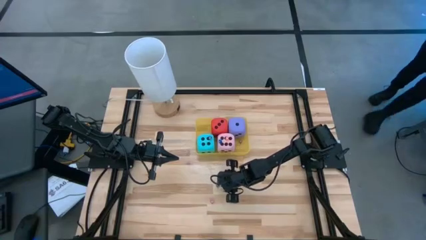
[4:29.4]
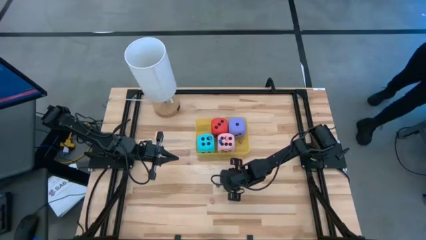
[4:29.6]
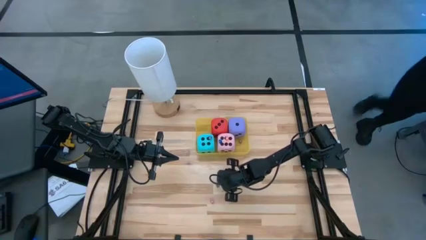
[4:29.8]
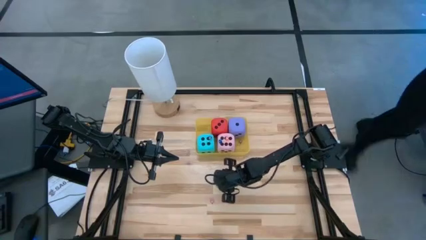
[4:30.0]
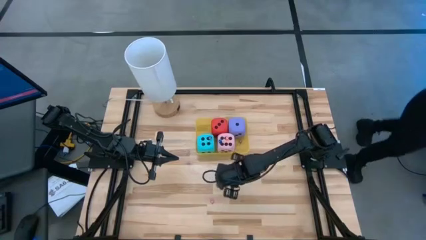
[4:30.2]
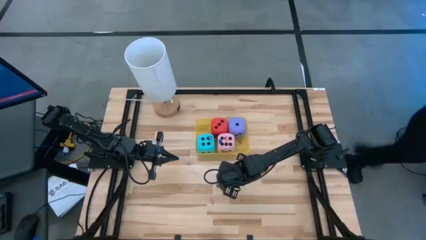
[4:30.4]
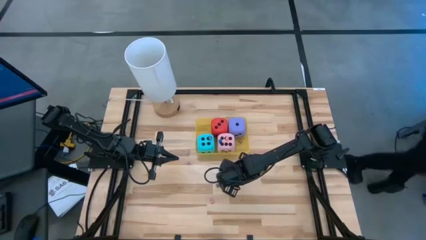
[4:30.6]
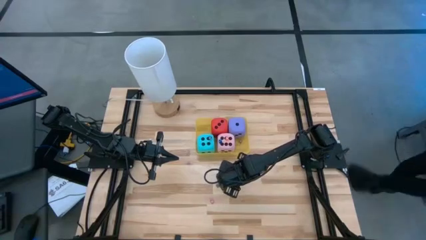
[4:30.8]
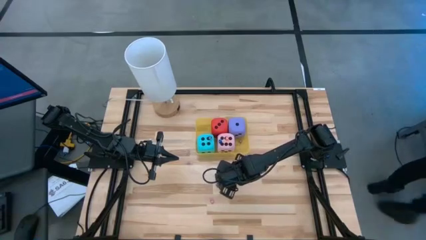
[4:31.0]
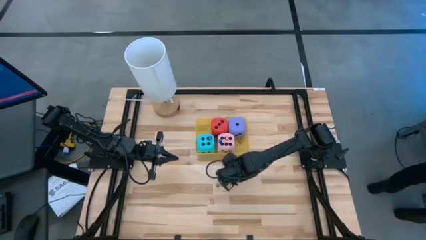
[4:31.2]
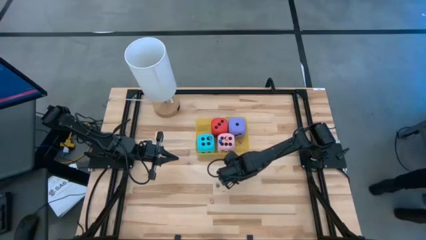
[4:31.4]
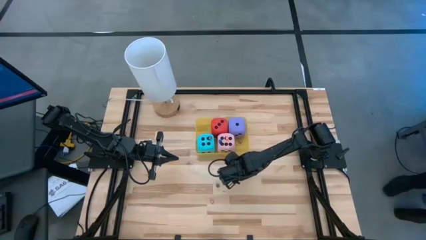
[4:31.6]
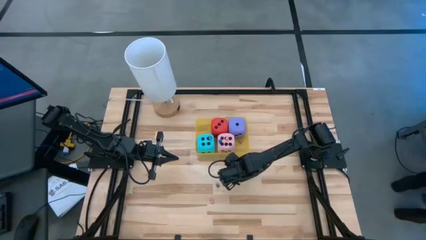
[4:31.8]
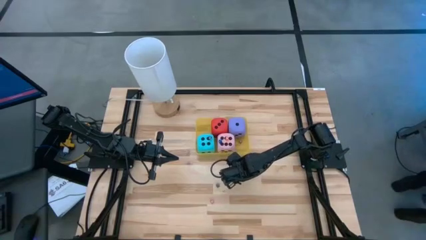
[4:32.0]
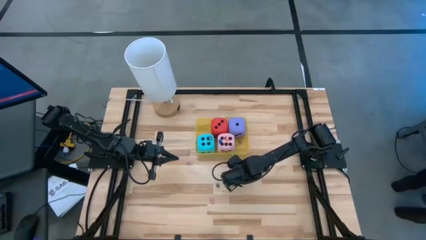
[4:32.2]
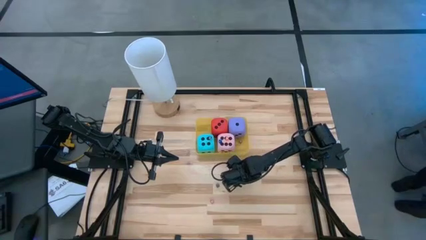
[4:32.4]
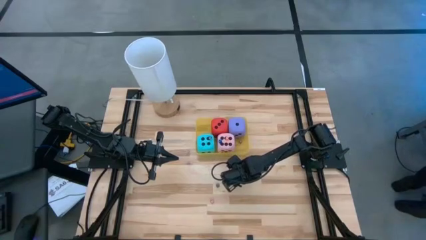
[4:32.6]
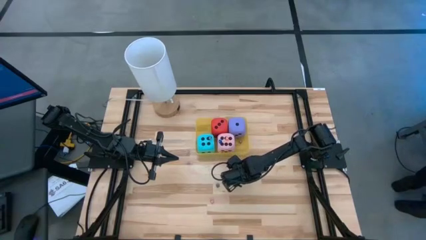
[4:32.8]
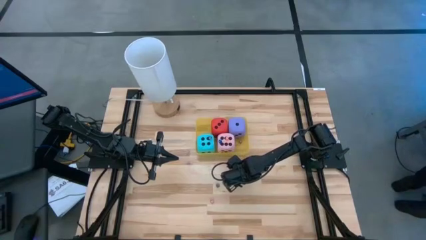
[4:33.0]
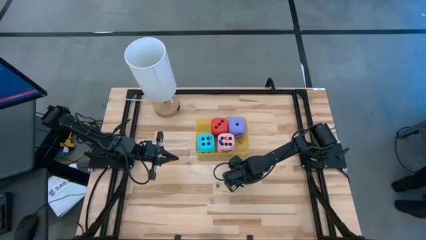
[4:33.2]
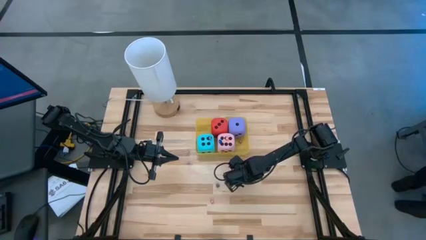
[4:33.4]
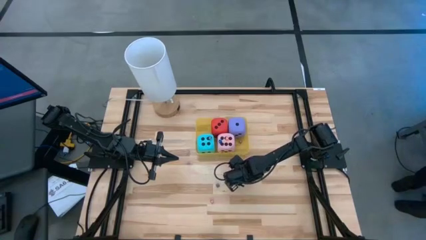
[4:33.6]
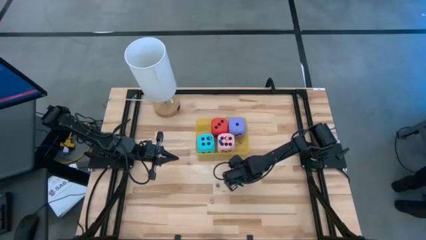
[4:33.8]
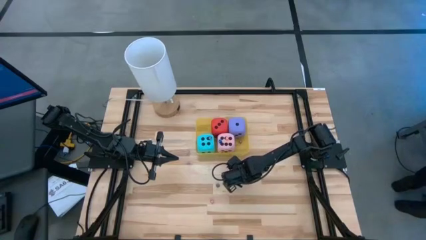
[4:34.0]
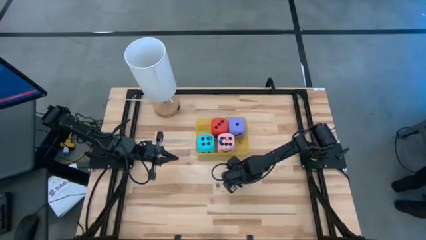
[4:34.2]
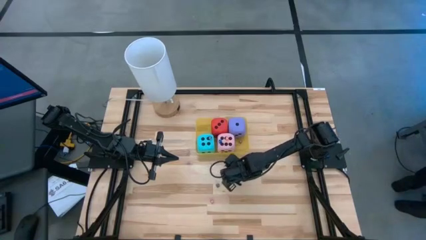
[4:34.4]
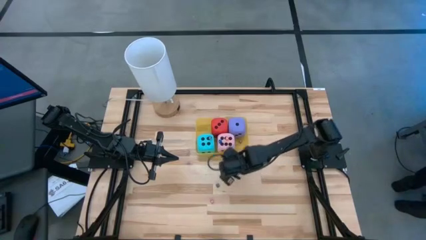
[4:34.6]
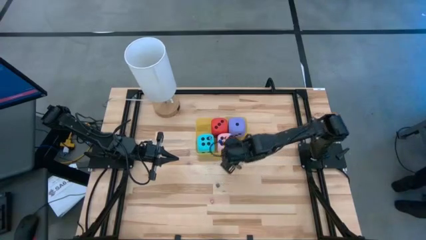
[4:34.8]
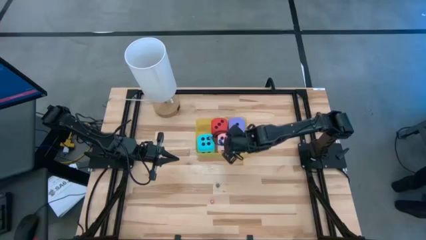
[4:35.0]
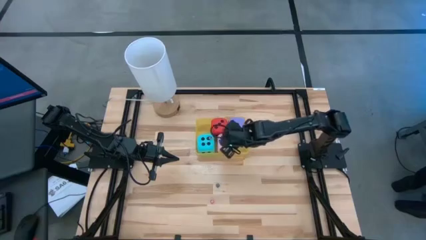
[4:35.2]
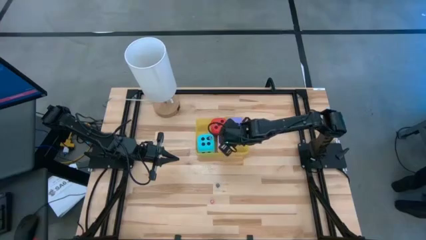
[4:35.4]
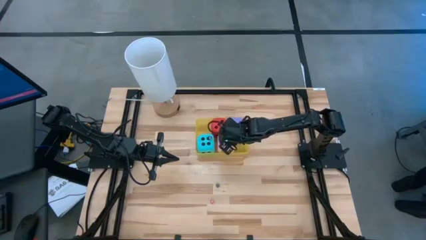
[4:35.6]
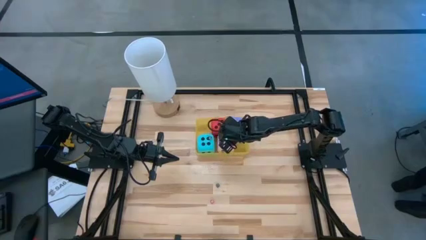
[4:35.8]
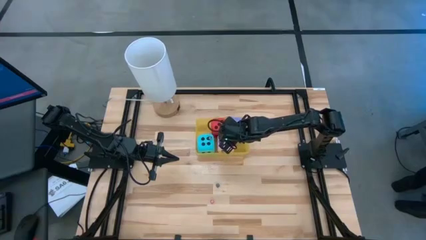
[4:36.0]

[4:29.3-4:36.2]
Task: Pick & Place Dice
Put the top small pink dice into the yellow bin

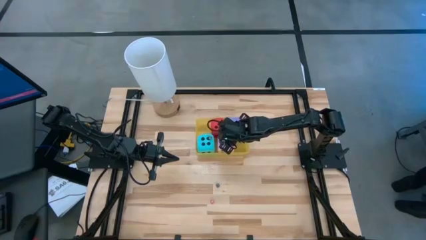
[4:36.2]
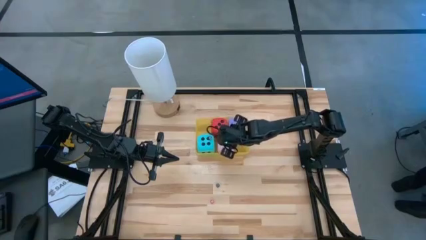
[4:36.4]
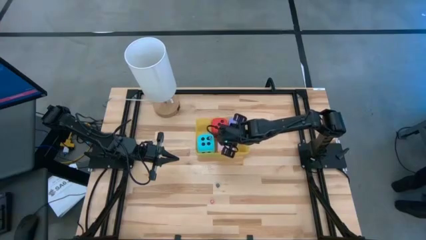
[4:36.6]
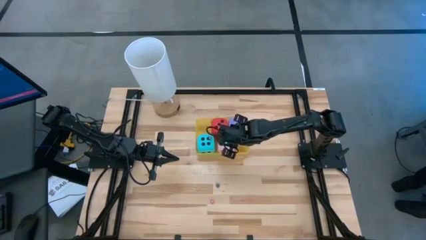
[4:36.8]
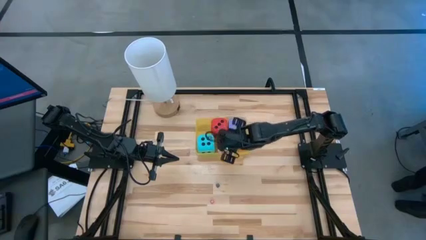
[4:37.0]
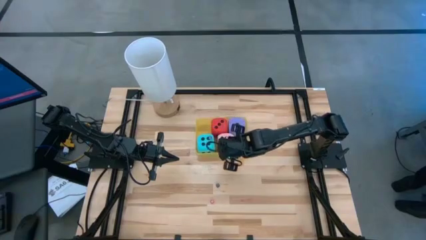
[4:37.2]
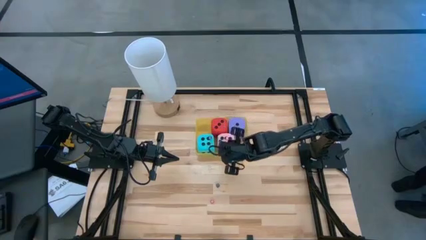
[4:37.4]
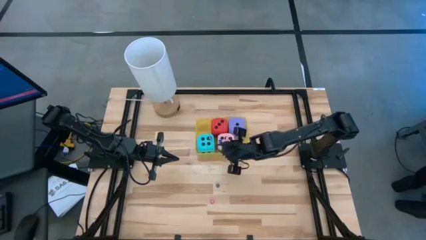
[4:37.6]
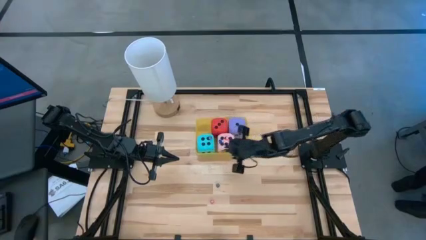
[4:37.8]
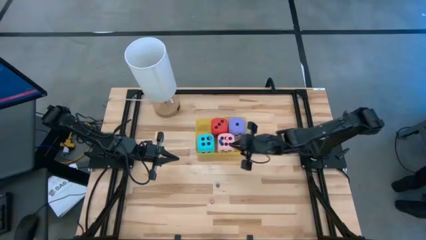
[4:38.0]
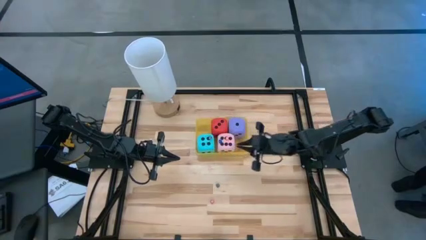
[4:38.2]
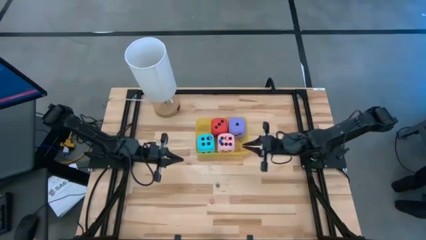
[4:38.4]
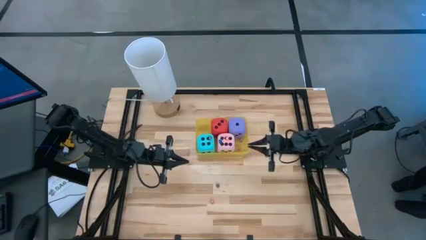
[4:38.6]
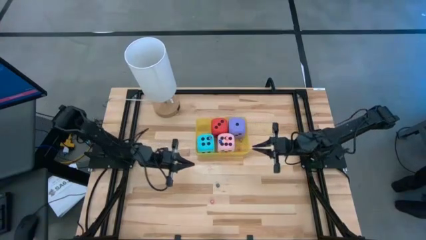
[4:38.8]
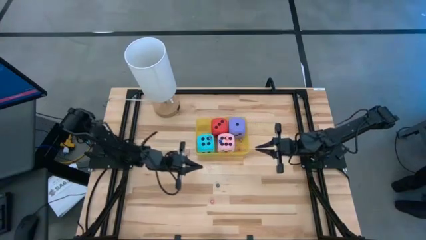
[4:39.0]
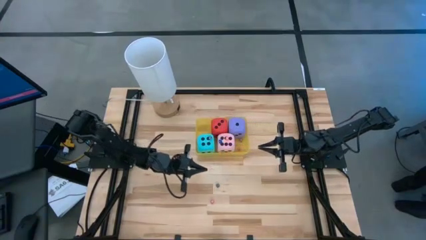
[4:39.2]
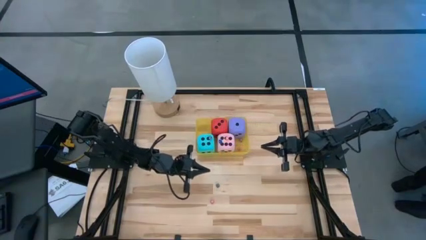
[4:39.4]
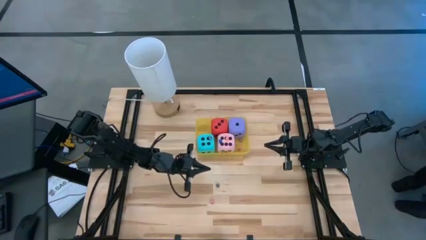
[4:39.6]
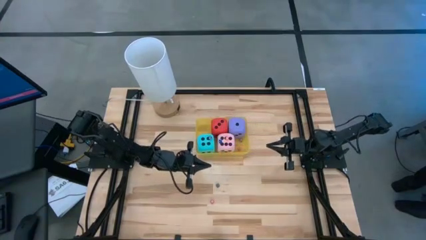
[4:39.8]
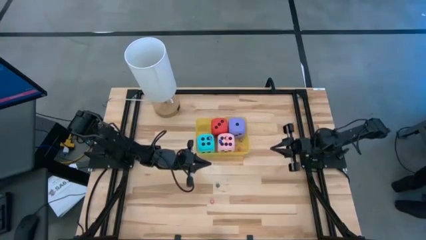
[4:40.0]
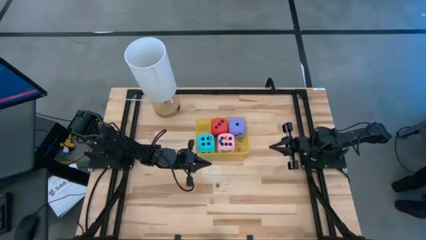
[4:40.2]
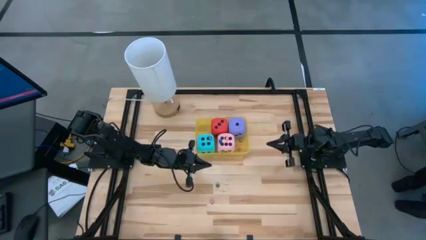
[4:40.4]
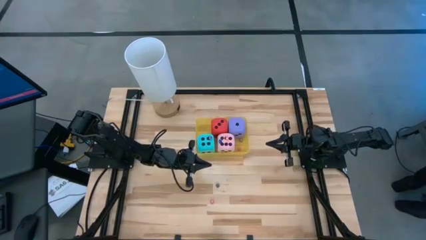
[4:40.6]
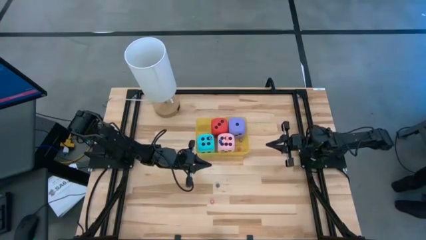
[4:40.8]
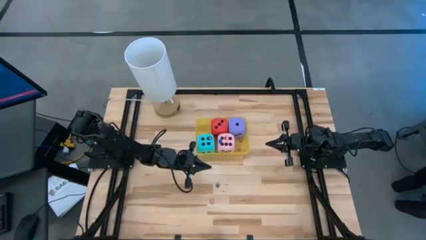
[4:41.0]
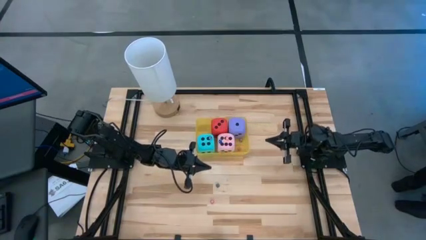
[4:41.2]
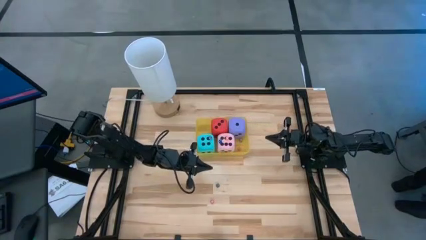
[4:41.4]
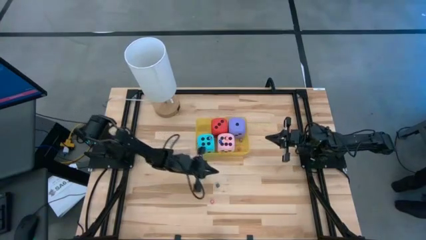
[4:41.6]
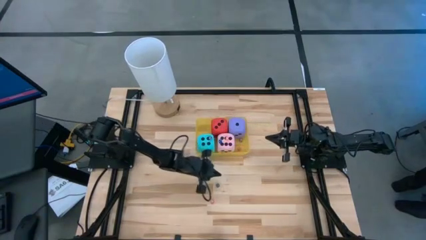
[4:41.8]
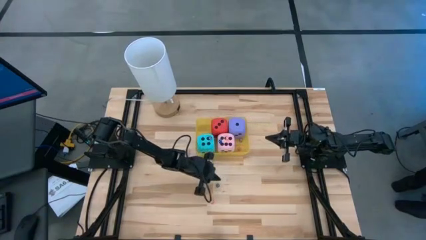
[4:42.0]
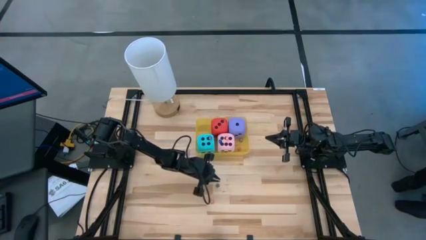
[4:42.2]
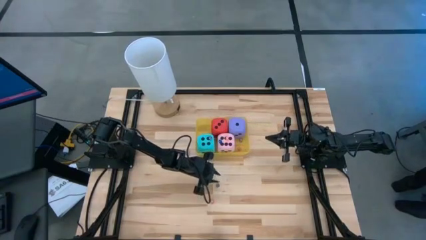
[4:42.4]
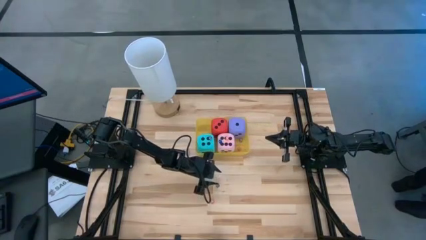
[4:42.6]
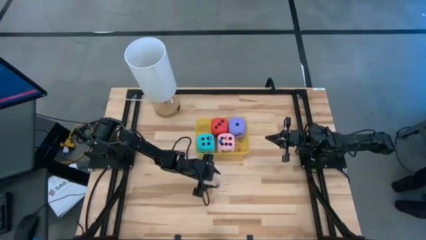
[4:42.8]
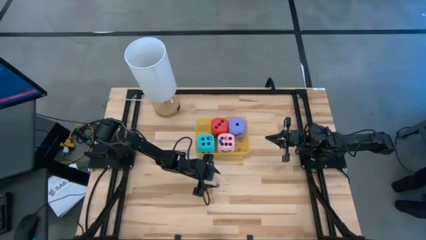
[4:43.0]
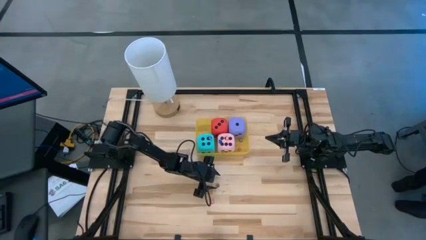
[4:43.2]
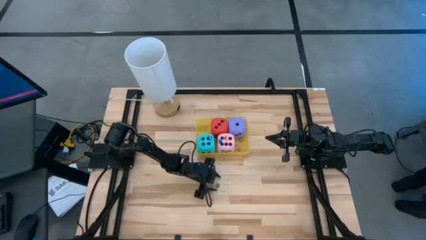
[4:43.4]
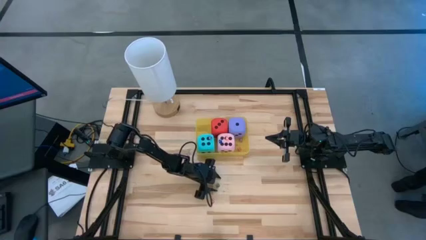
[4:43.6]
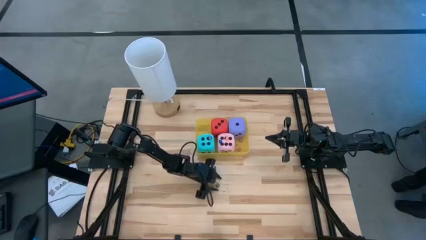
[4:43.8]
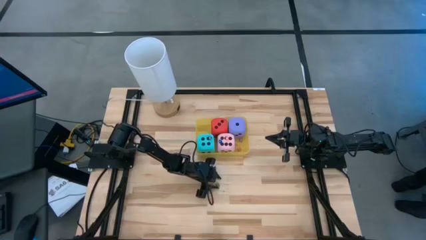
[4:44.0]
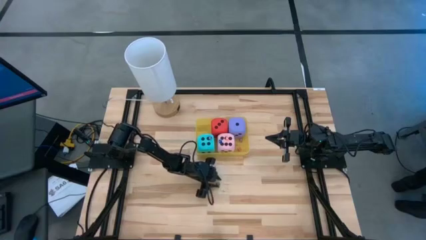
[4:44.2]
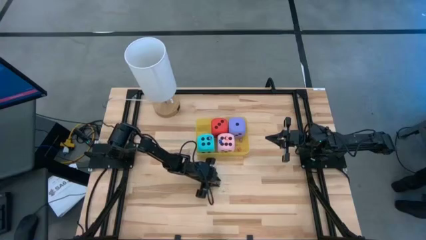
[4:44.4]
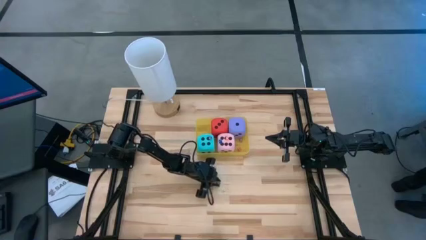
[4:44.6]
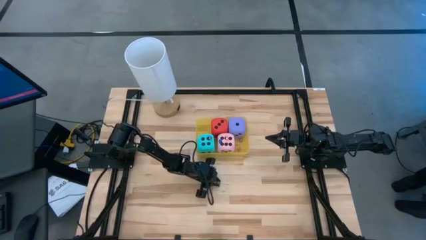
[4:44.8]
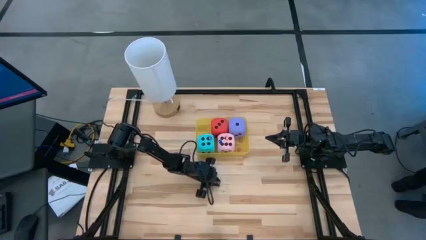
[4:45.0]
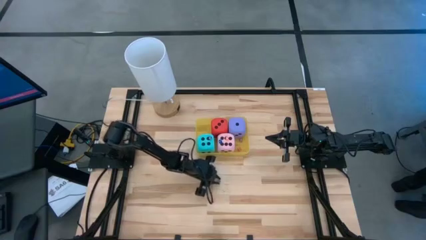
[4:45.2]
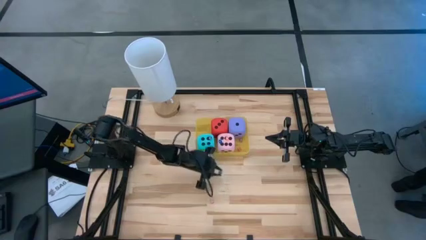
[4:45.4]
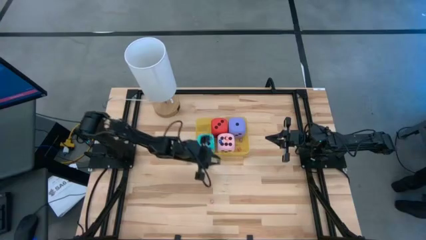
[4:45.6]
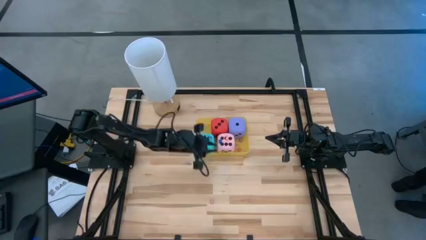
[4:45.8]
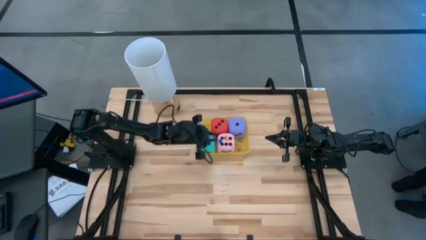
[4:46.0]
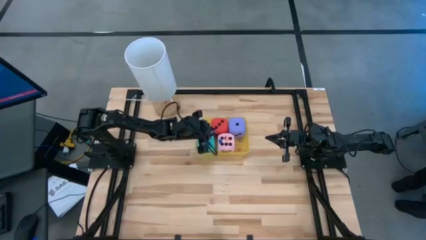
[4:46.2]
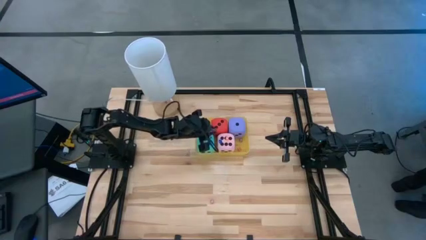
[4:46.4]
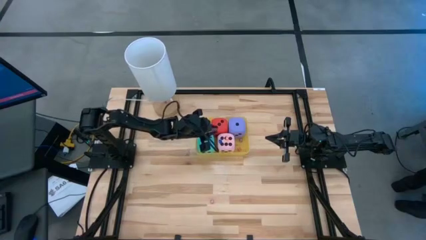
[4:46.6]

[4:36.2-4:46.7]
Put the black dice into the yellow bin
